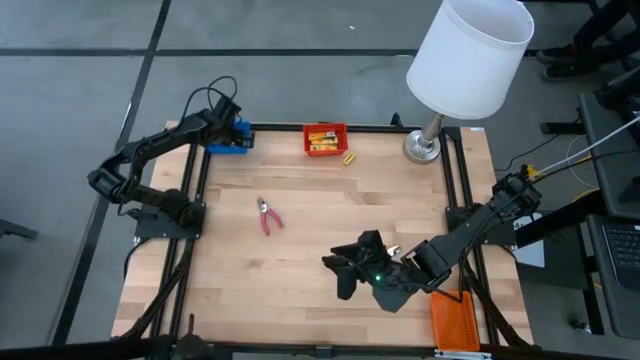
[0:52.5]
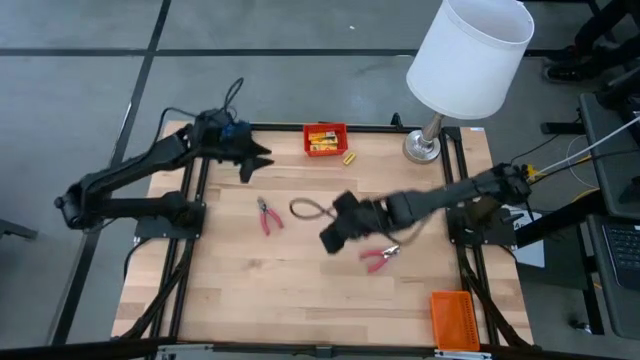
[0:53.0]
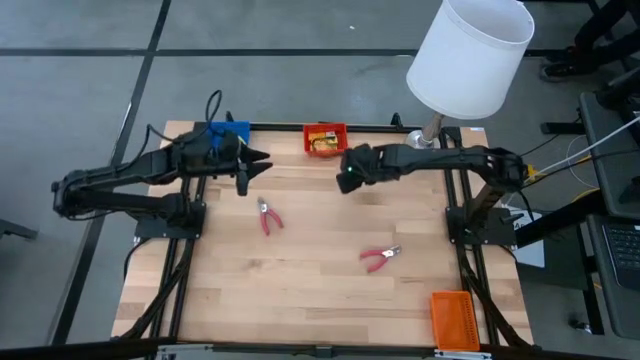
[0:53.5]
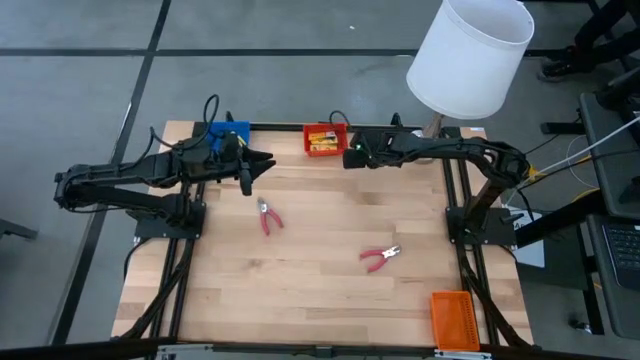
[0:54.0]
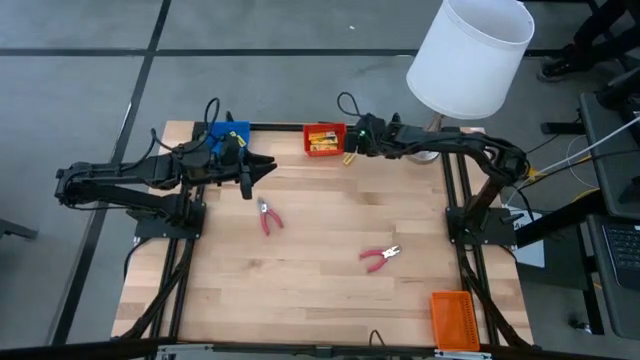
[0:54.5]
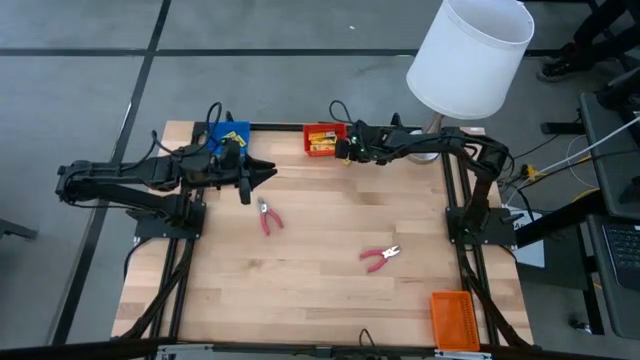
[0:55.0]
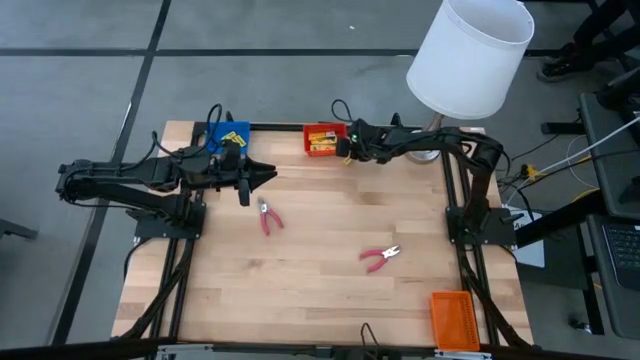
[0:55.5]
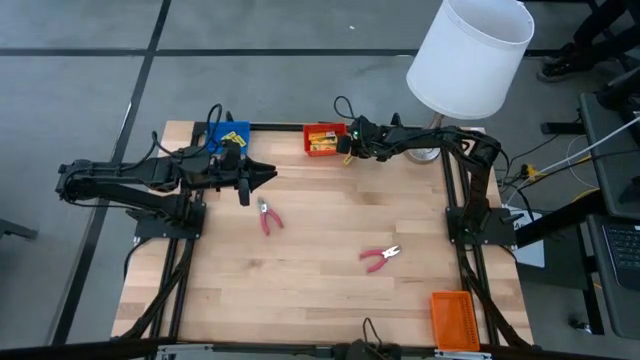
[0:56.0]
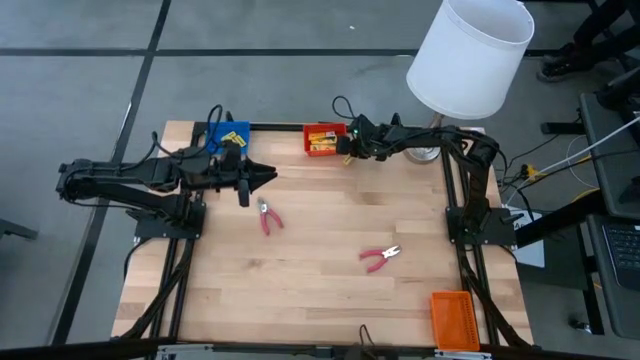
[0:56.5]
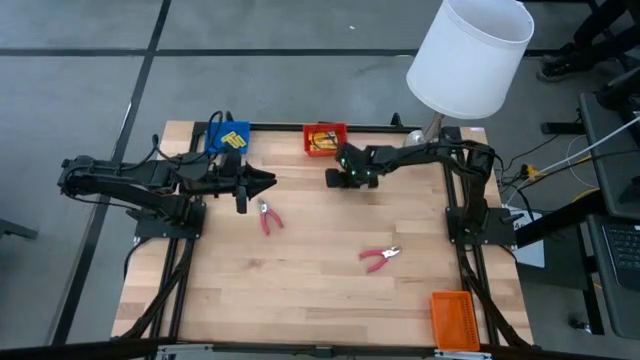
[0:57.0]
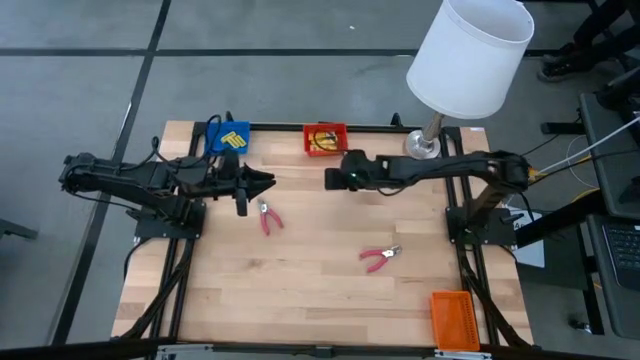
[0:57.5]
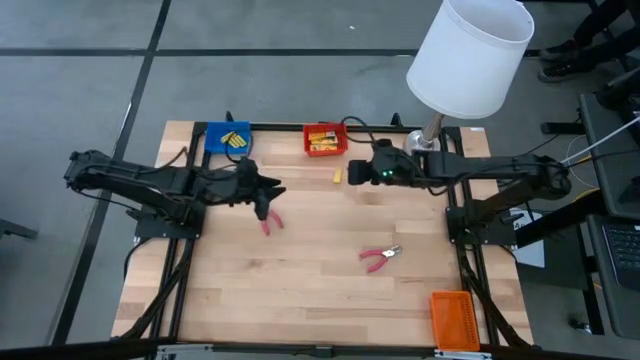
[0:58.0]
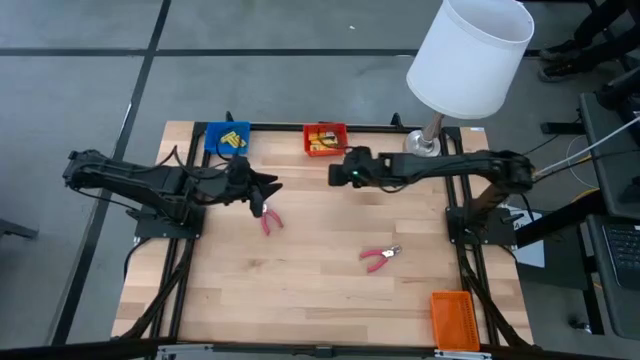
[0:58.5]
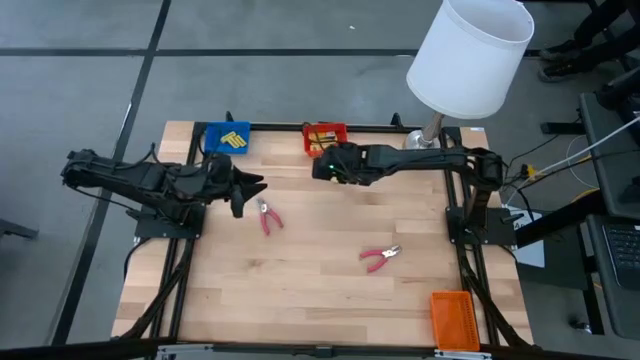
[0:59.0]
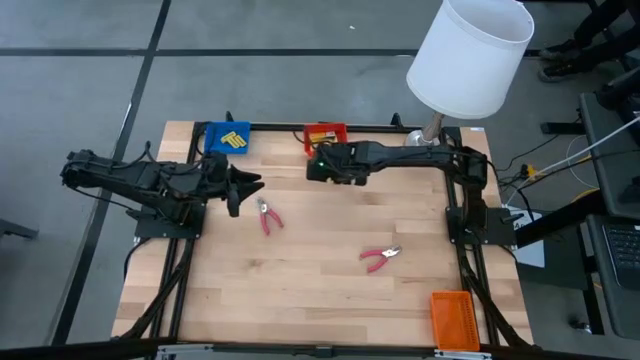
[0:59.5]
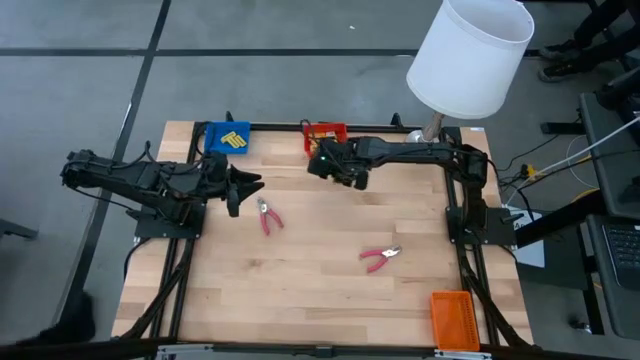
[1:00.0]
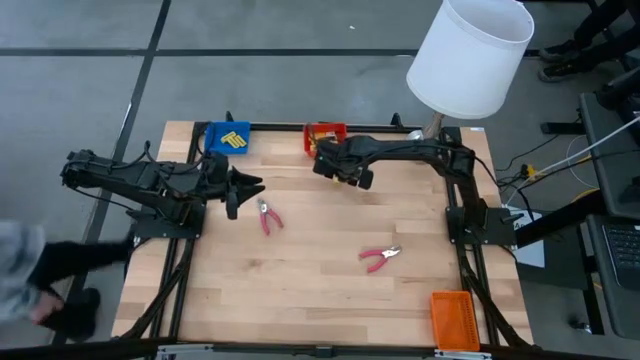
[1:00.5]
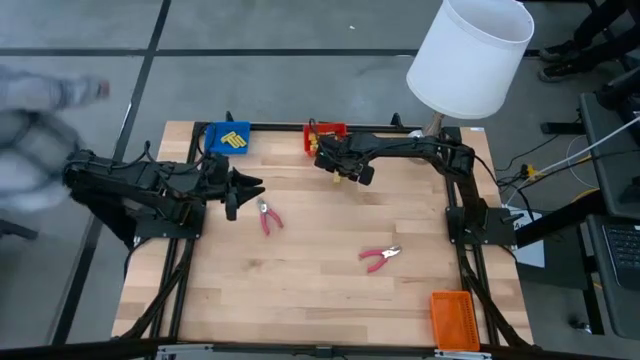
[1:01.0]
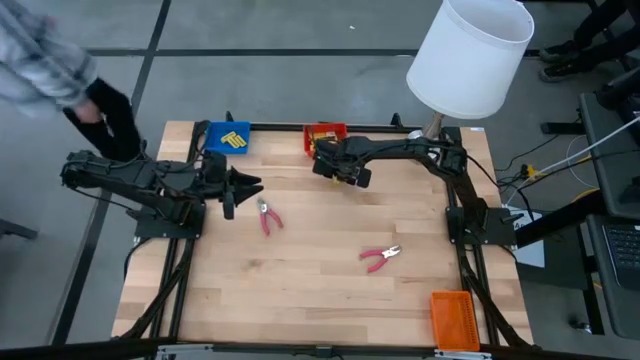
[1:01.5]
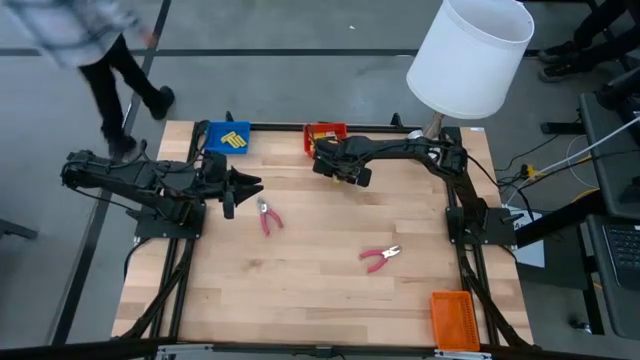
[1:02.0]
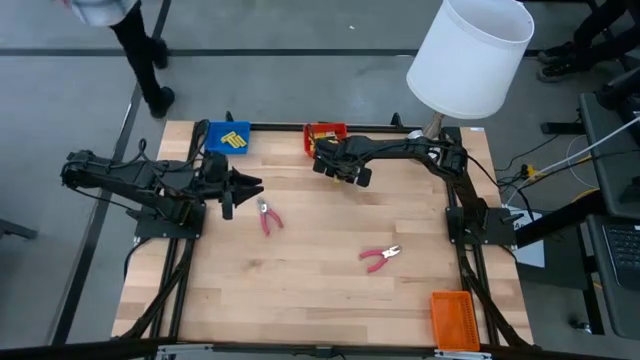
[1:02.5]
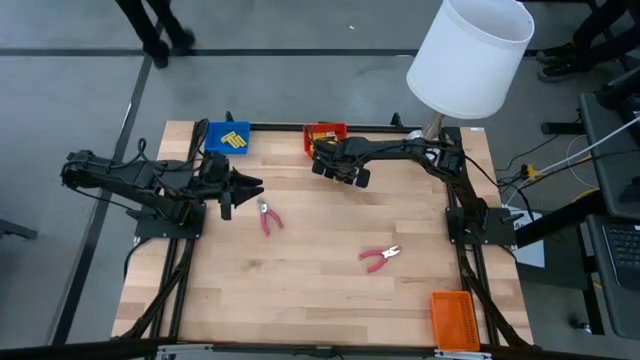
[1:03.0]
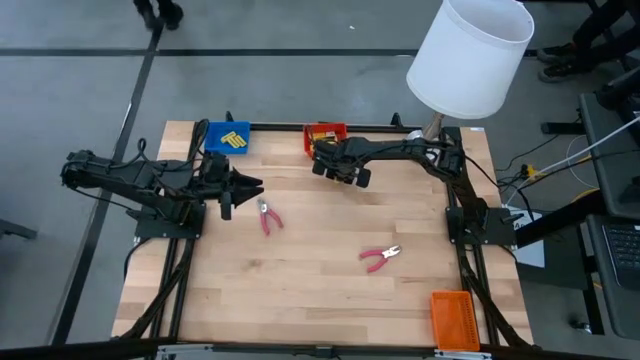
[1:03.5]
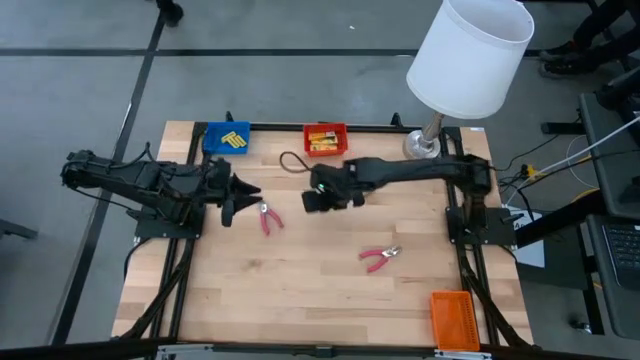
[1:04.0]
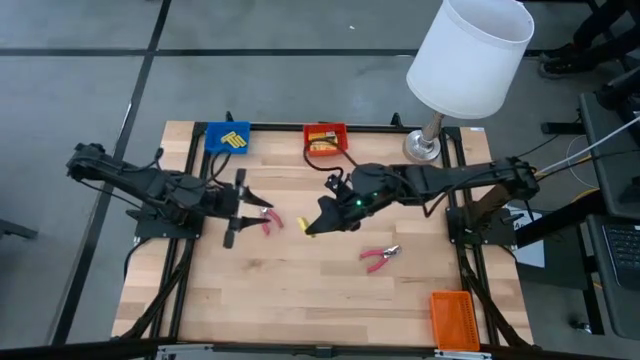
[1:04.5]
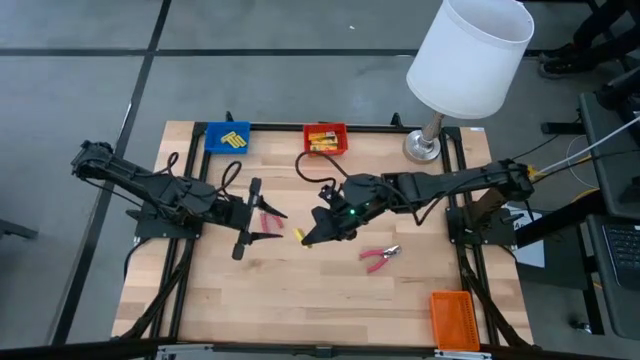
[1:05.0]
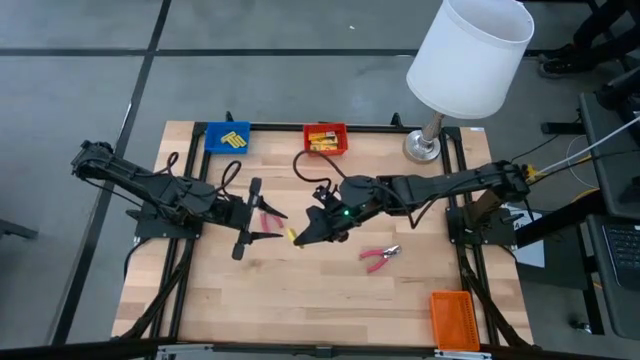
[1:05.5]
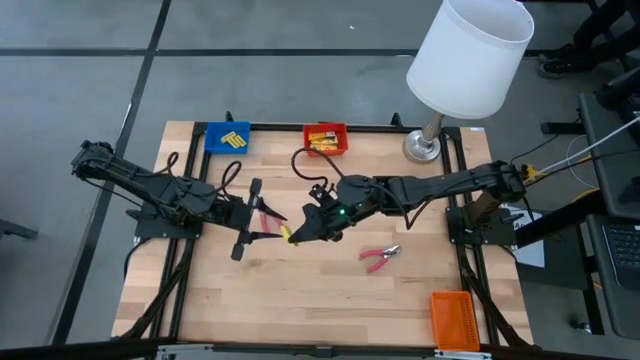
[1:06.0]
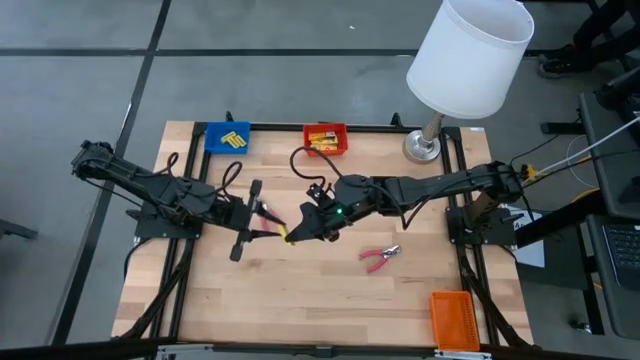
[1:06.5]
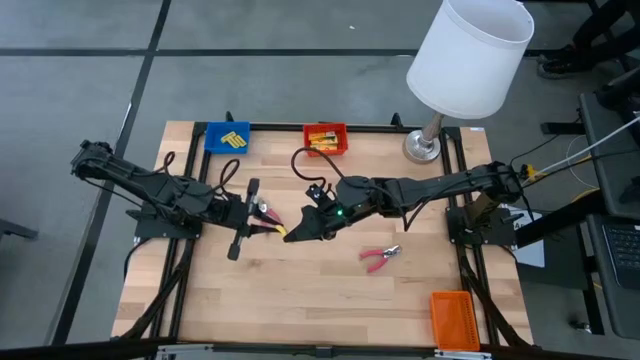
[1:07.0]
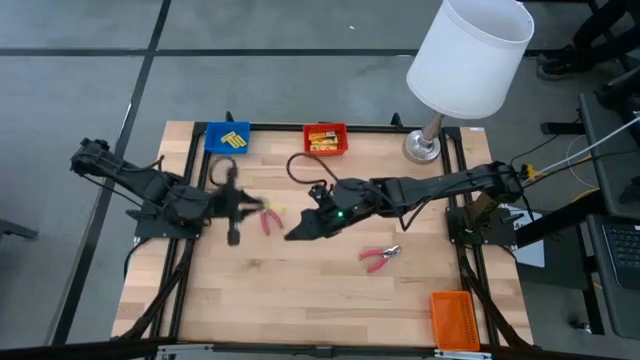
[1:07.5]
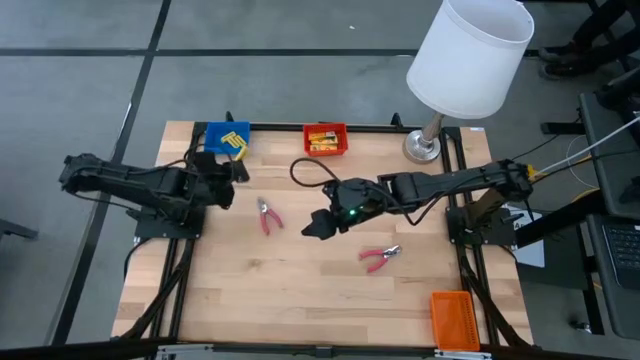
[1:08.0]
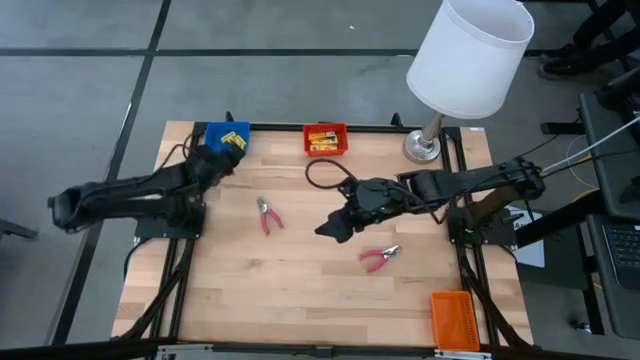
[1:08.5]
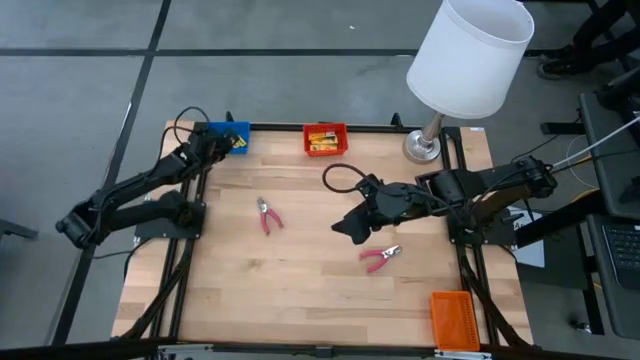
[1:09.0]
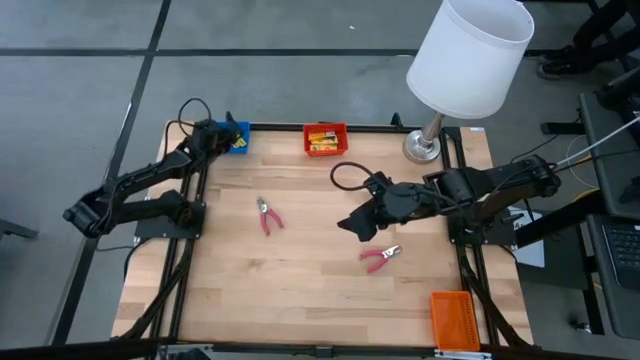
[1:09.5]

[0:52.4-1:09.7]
Task: Pick & Place School Supplies
Put the yellow eraser into the blue bin

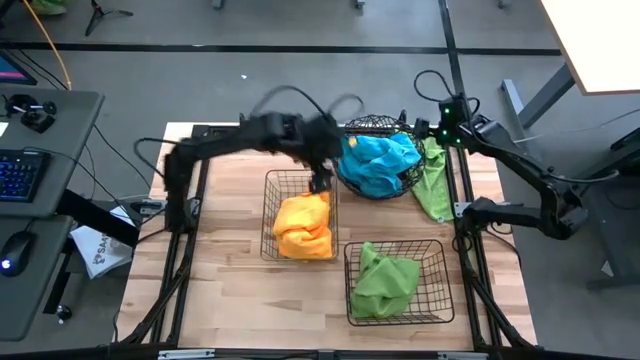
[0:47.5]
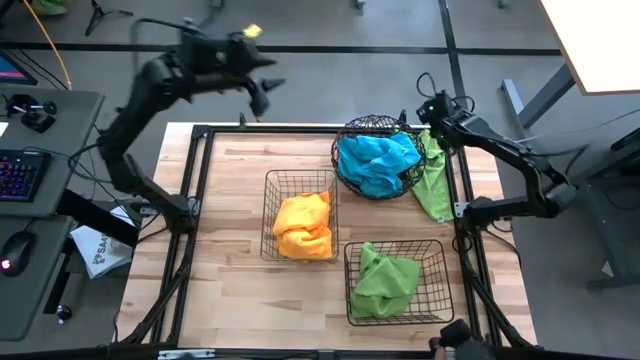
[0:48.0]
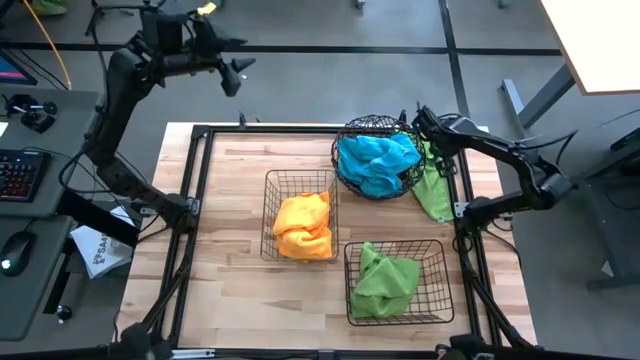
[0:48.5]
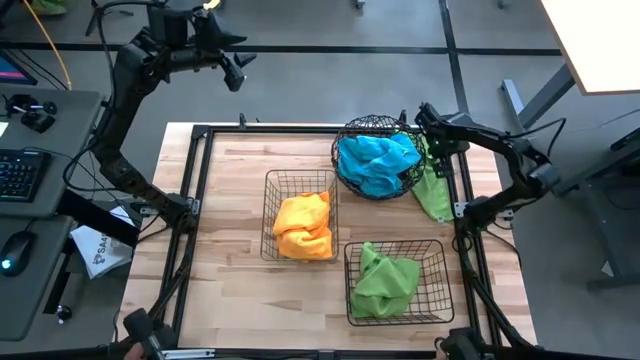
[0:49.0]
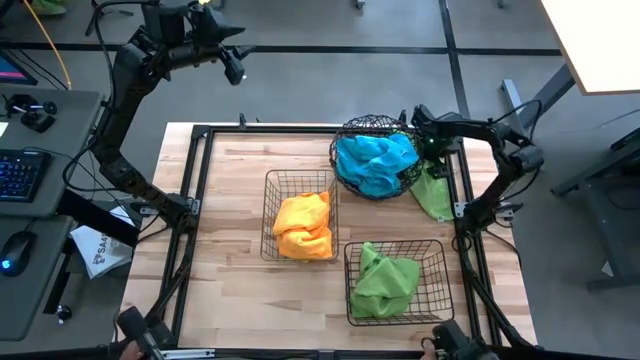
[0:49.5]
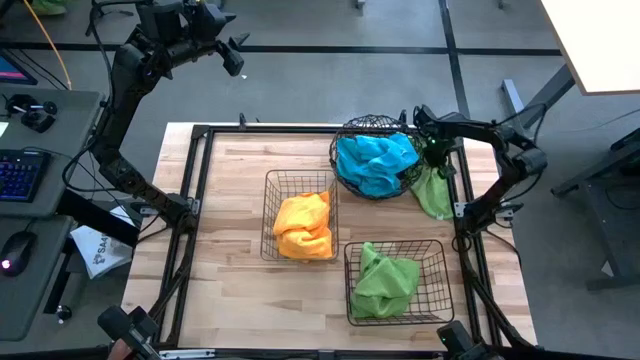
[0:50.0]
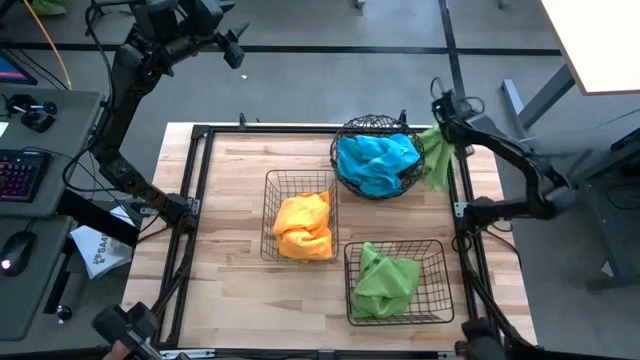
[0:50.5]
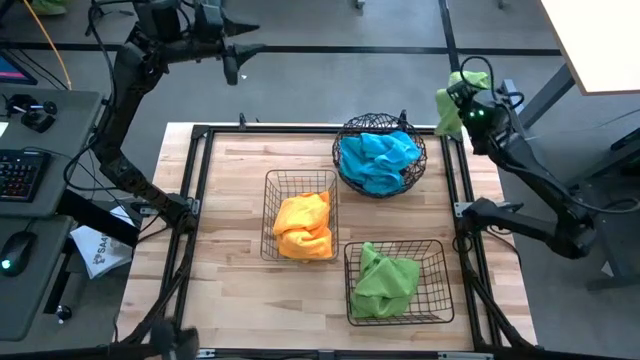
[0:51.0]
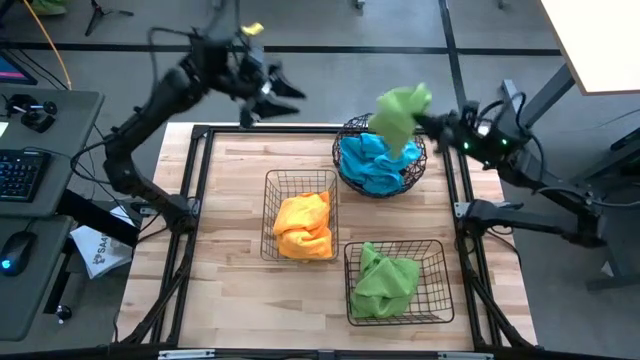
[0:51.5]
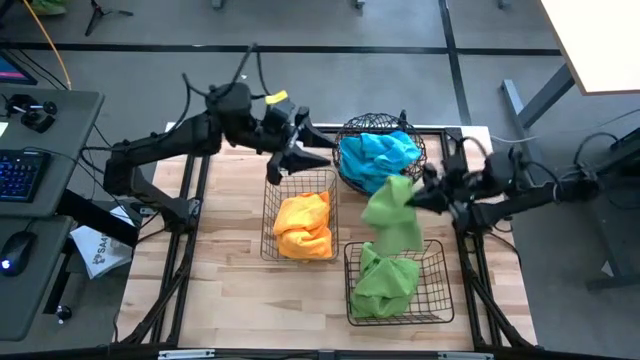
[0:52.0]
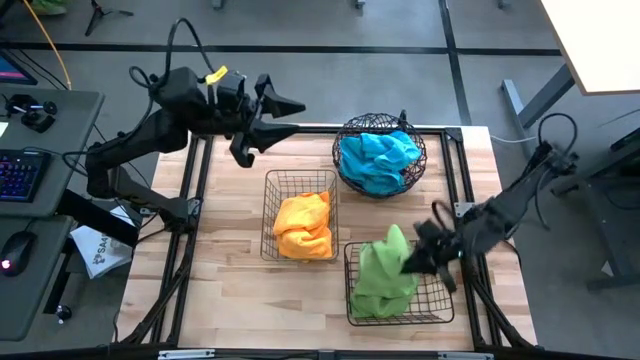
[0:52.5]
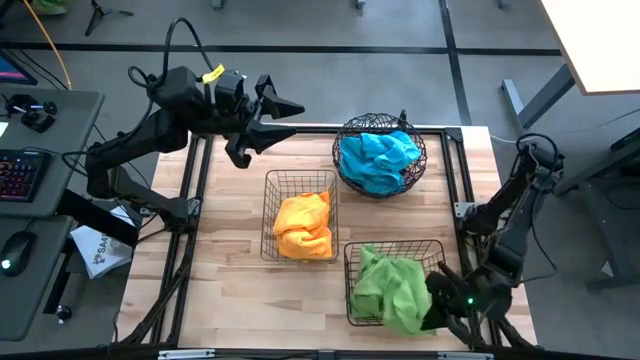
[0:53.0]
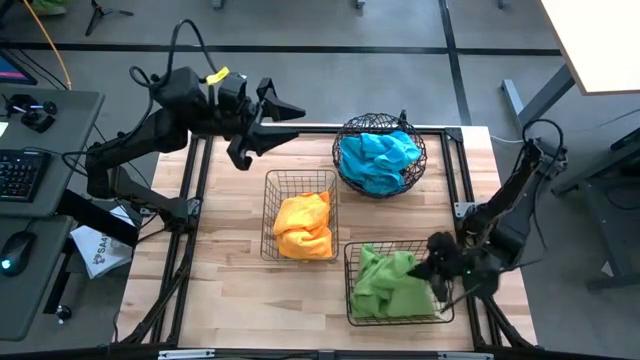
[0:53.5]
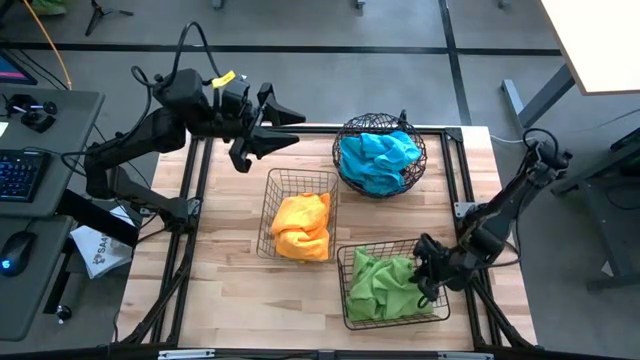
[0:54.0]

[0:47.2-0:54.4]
Task: Sort microfiber towel by color & place in baskets
Put the green microfiber towel into the bottom right black metal basket
